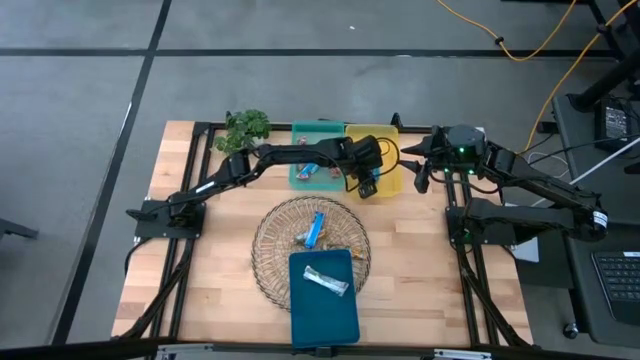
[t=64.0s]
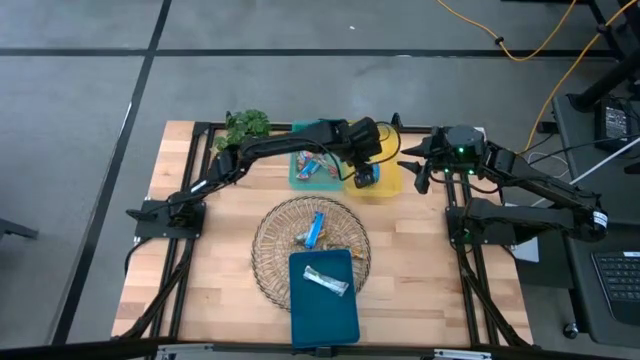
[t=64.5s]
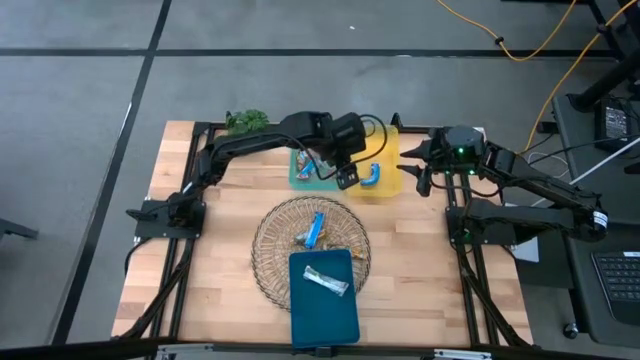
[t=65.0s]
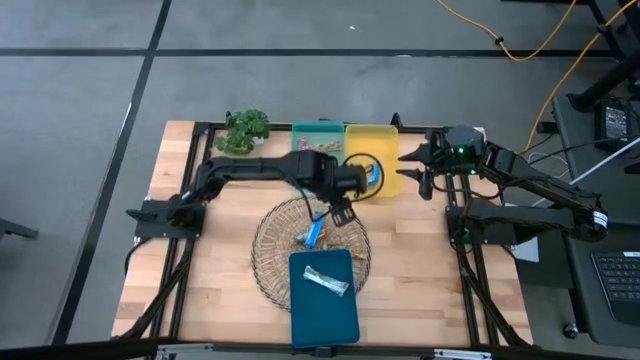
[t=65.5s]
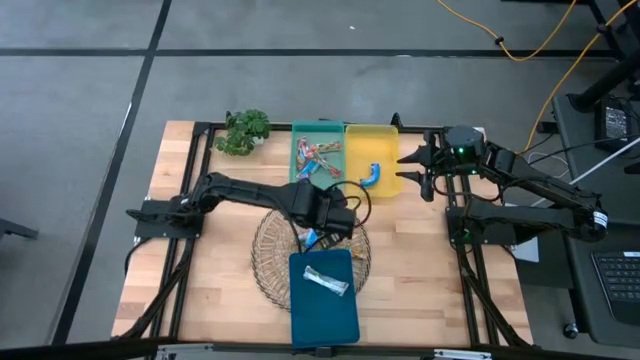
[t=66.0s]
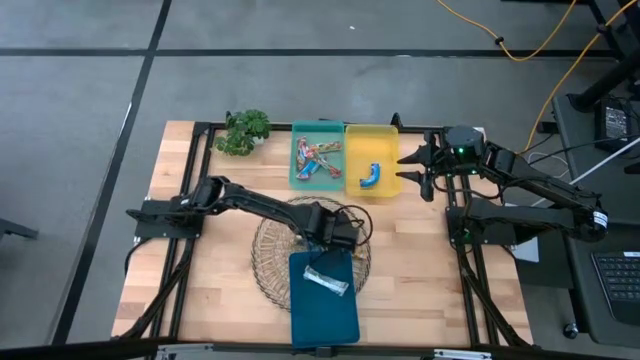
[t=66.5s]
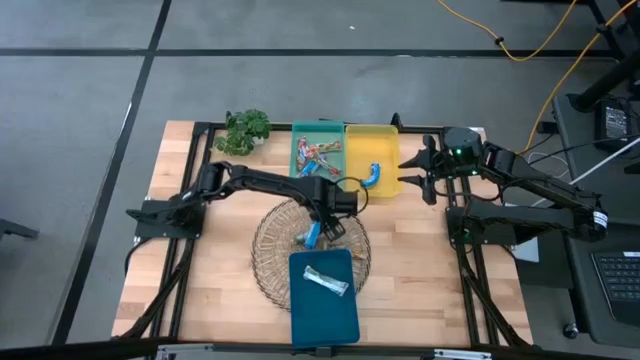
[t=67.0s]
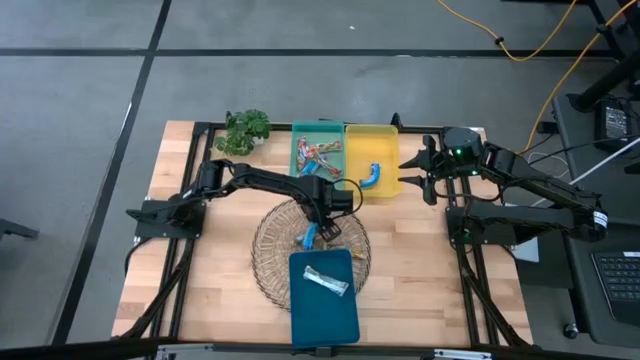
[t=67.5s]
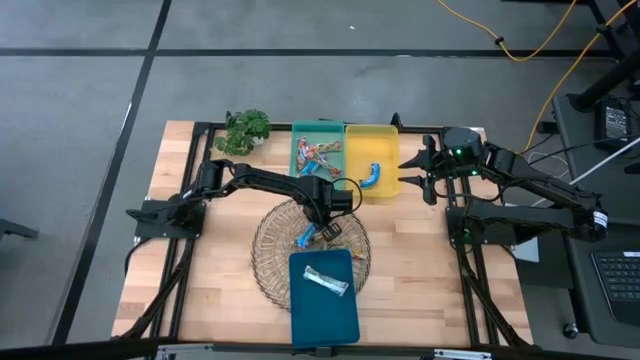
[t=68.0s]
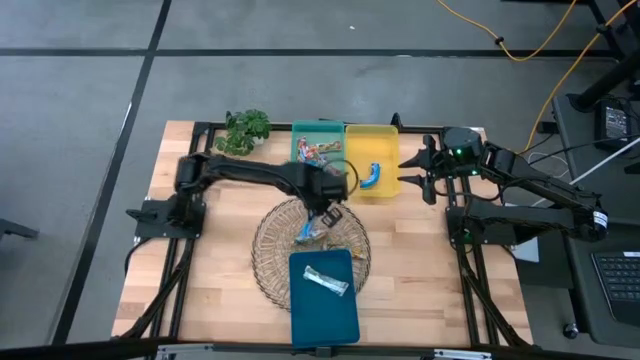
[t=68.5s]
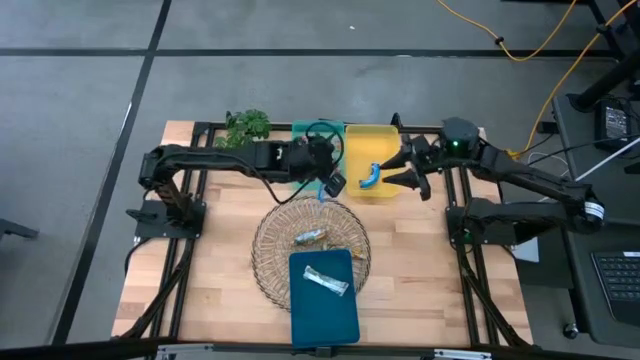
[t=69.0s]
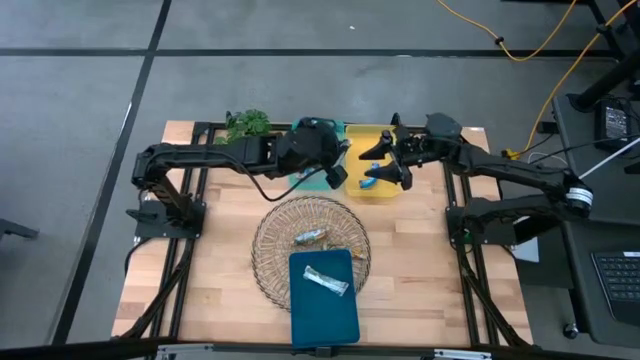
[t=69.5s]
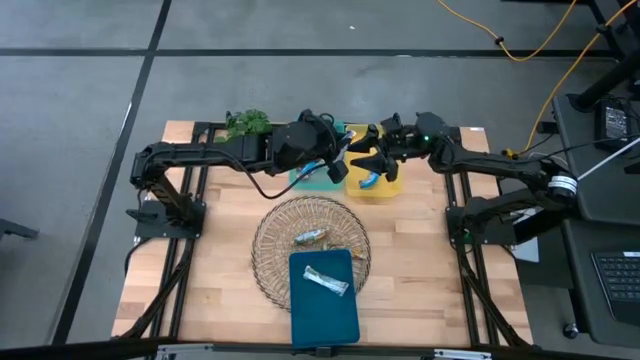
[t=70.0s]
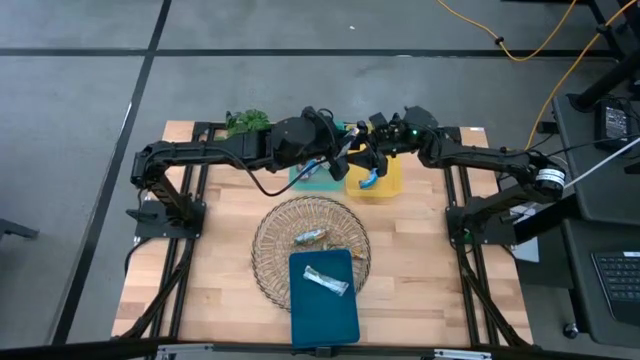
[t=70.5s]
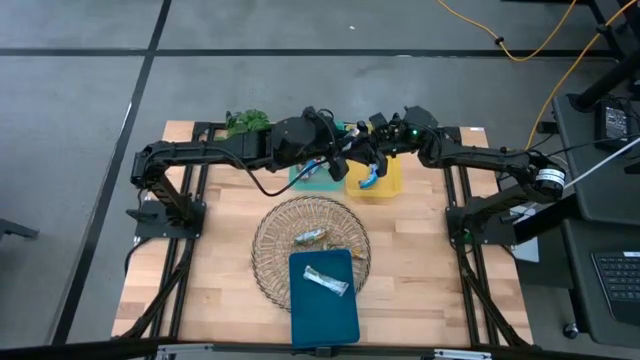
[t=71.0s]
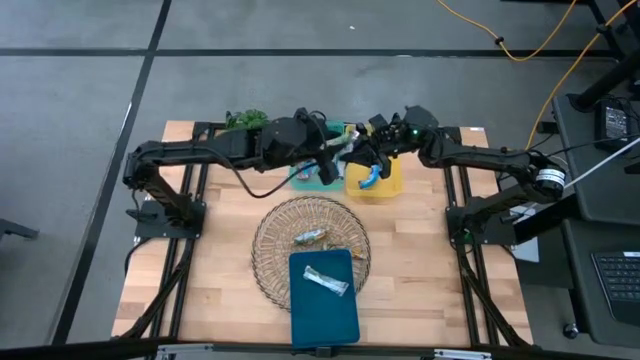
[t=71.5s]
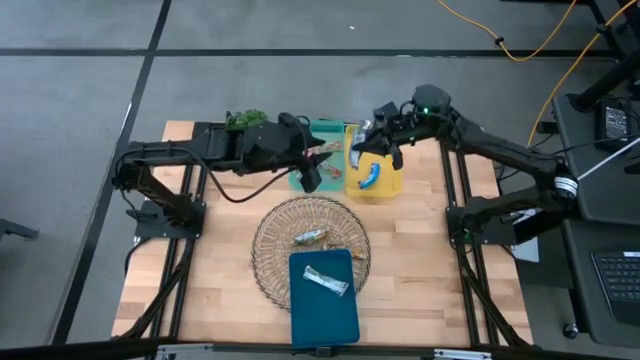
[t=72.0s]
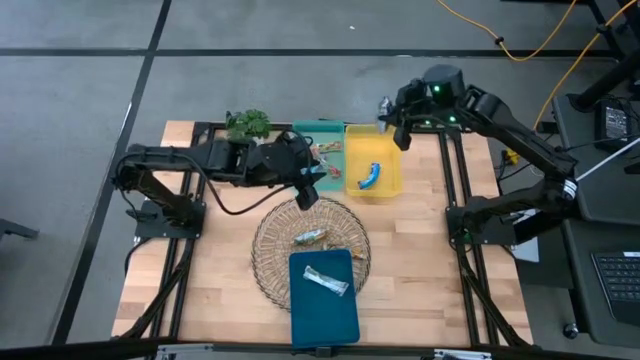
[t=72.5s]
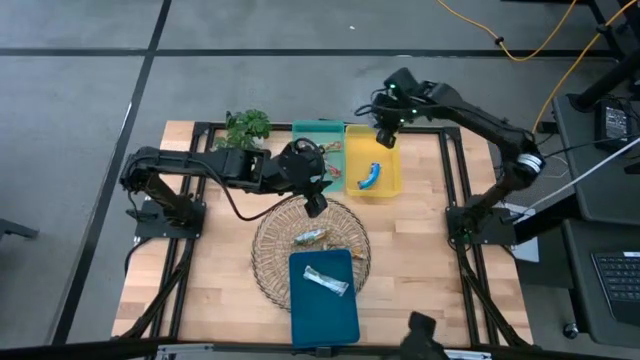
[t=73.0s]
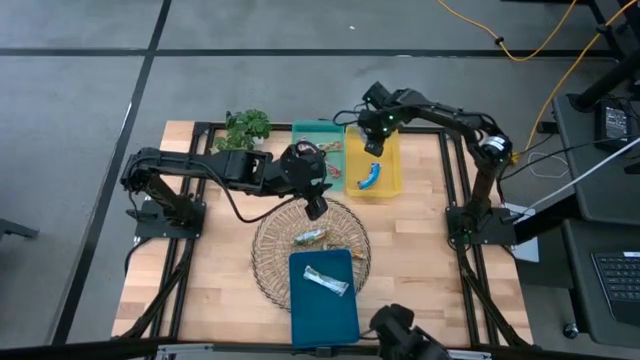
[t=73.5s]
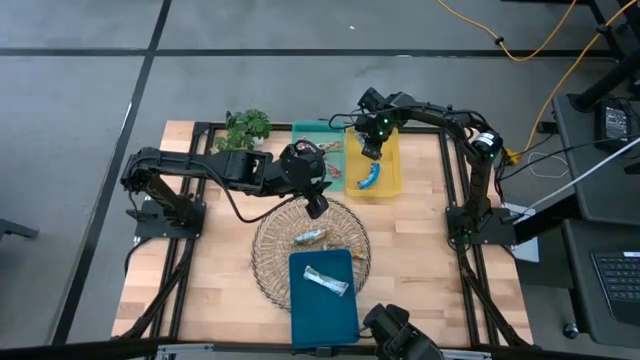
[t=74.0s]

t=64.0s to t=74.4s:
Task: Pick and place Granola Bars by type
Put the blue granola bar into the yellow container

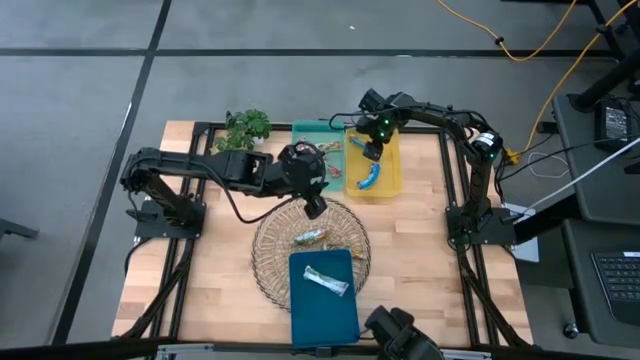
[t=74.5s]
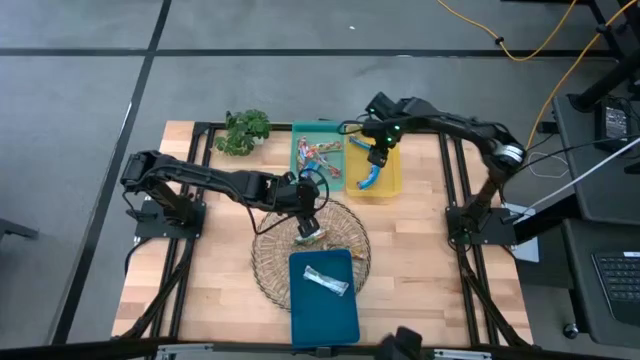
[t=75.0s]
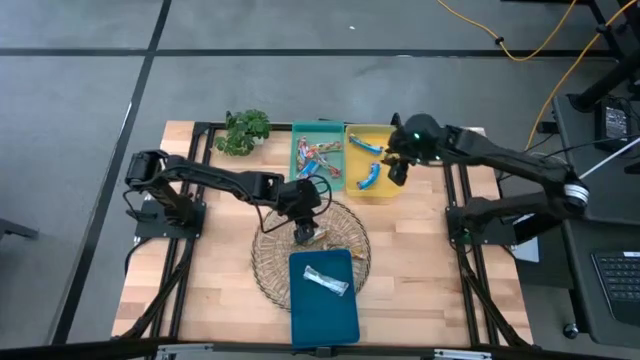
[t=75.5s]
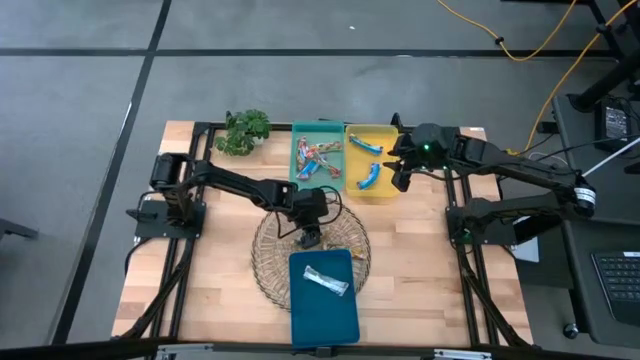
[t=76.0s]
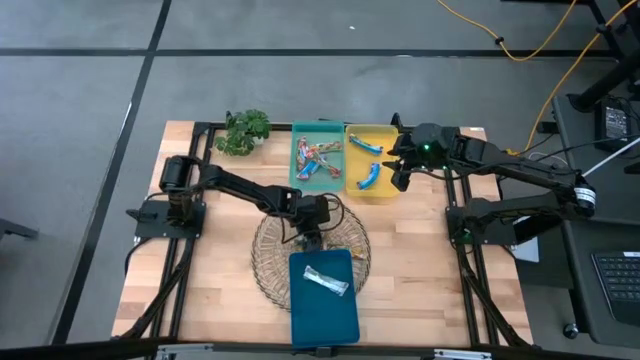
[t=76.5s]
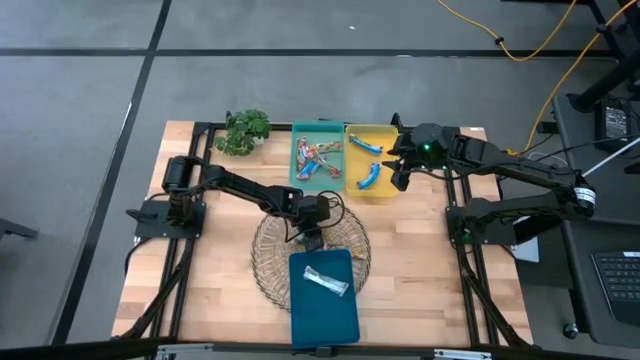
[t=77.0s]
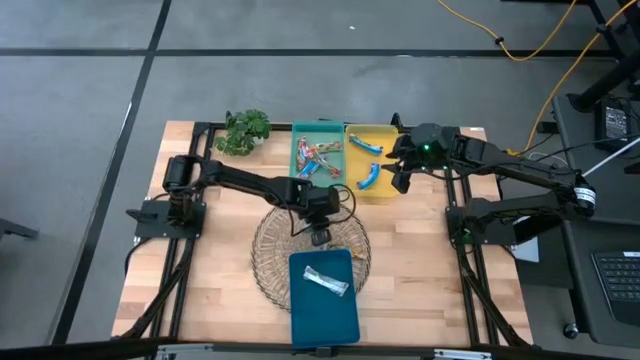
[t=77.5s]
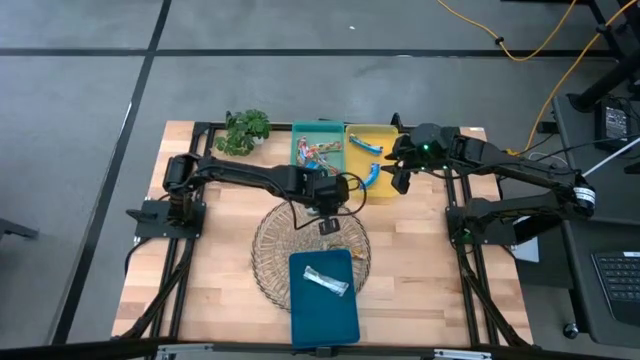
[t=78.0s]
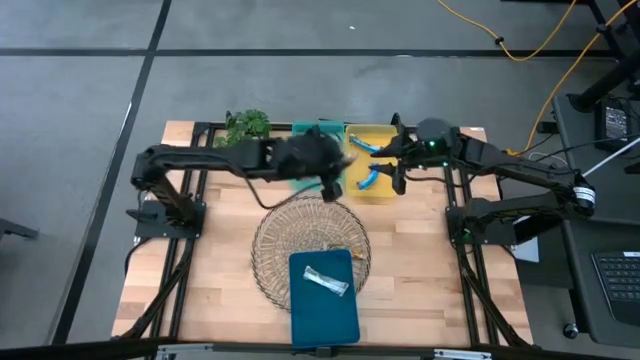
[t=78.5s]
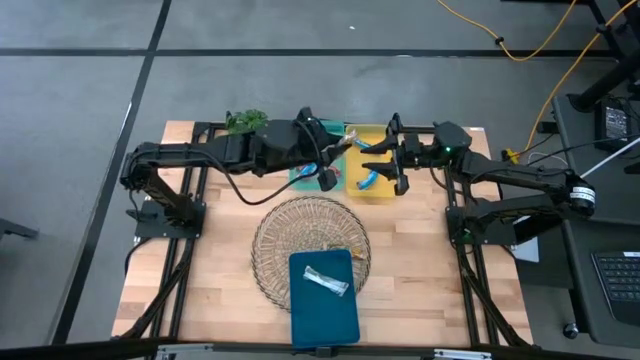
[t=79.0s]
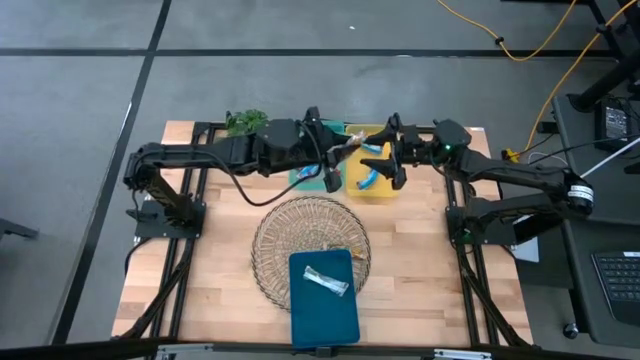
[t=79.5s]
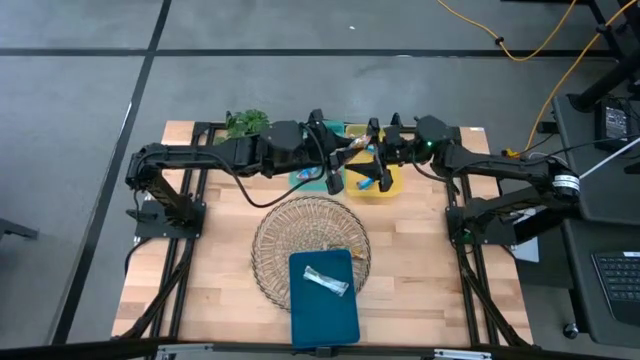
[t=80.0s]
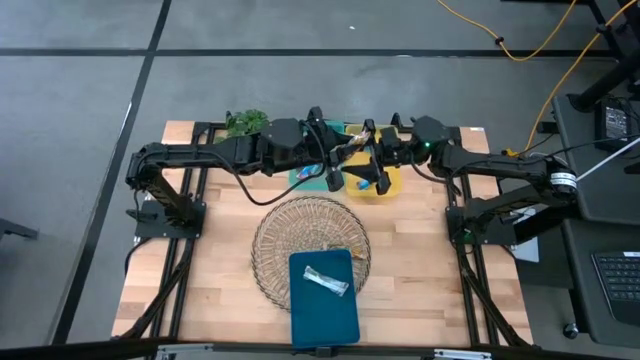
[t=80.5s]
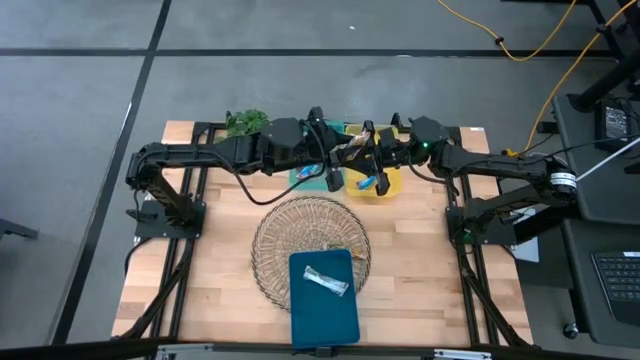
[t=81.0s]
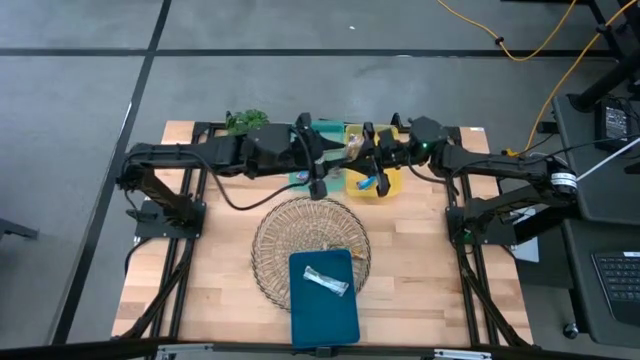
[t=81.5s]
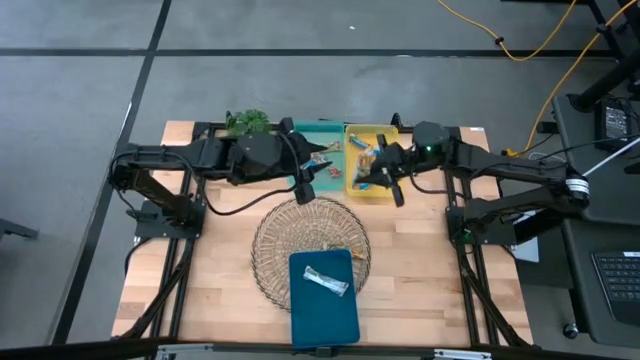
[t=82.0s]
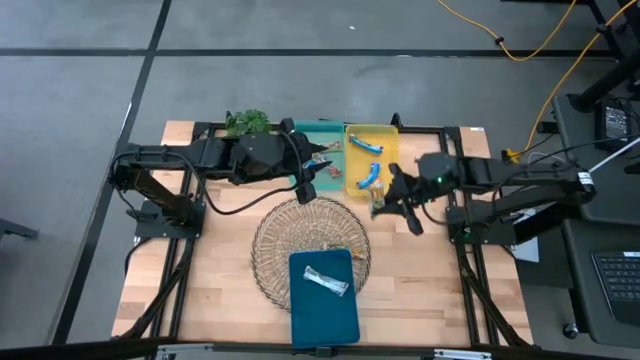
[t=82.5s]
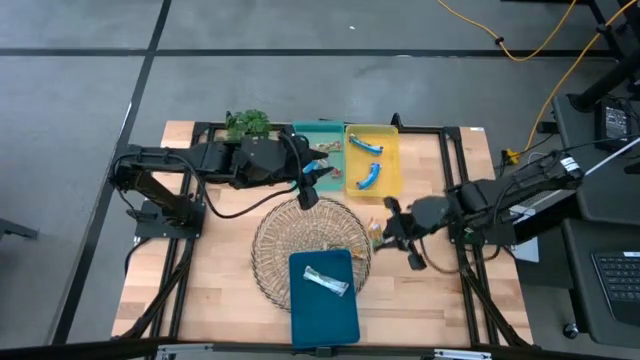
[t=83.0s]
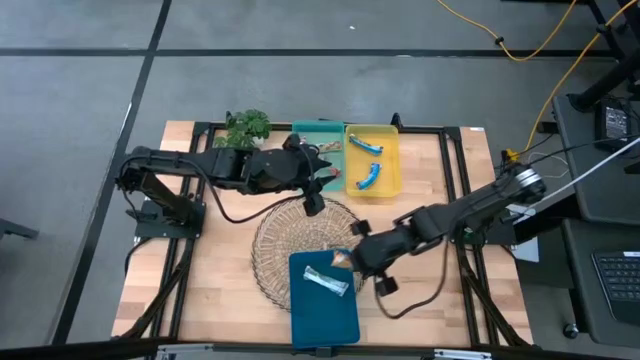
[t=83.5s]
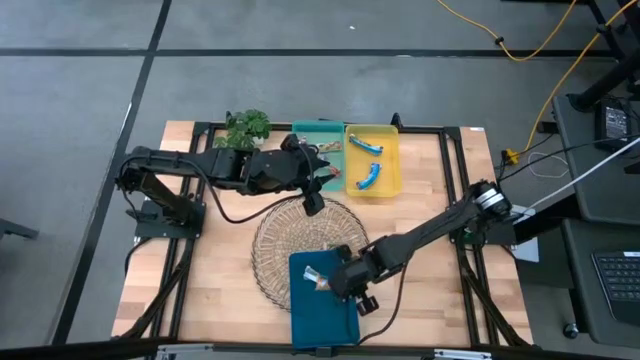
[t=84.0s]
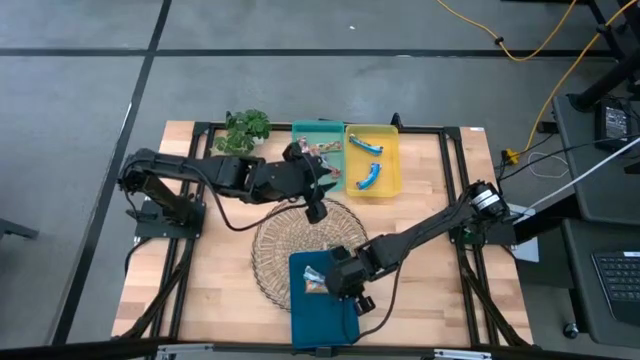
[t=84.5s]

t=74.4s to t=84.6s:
Put the yellow granola bar into the blue container
